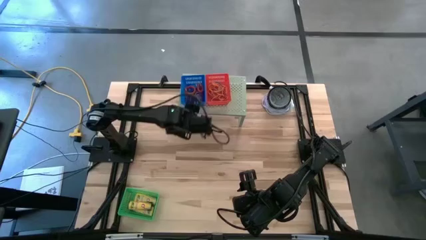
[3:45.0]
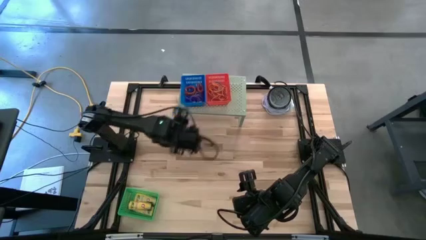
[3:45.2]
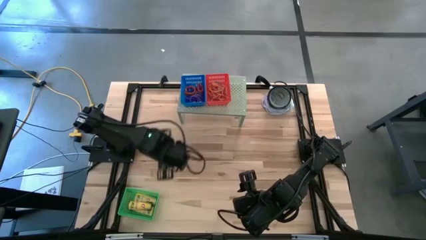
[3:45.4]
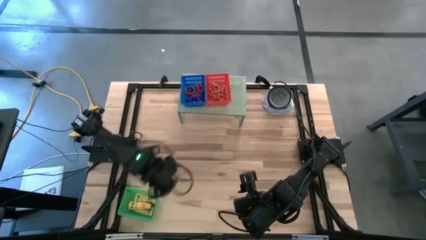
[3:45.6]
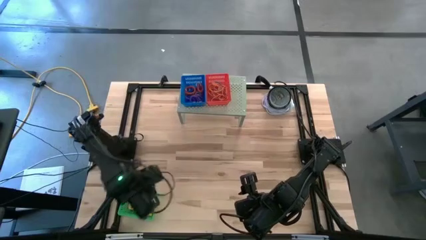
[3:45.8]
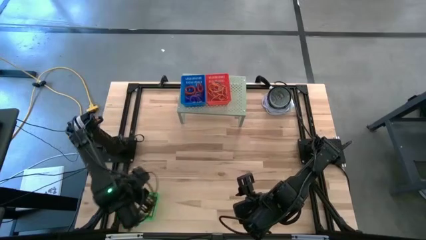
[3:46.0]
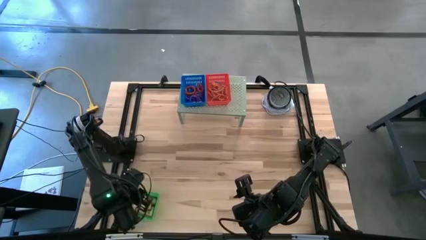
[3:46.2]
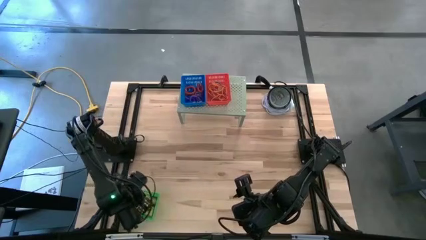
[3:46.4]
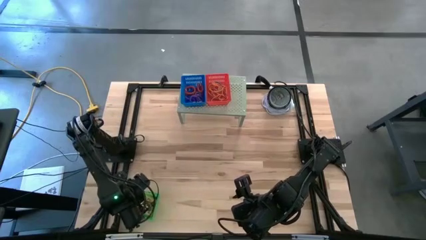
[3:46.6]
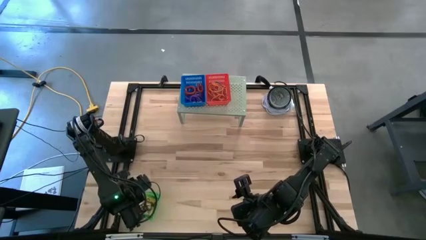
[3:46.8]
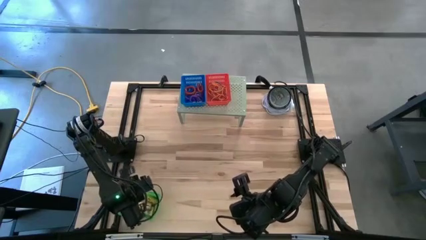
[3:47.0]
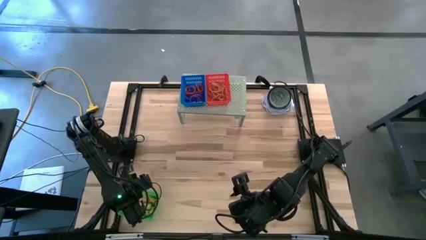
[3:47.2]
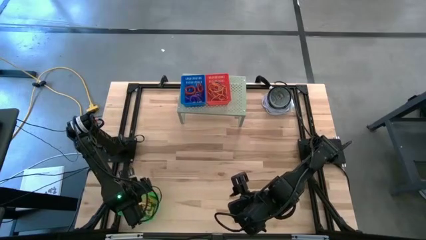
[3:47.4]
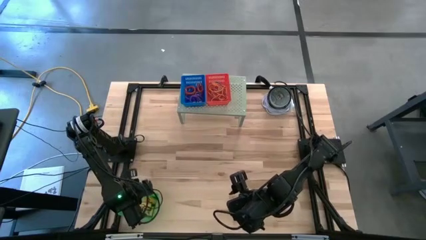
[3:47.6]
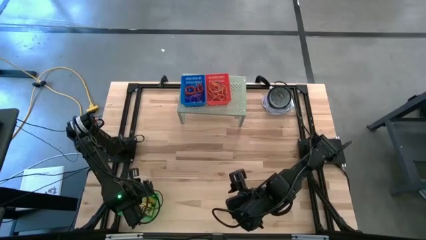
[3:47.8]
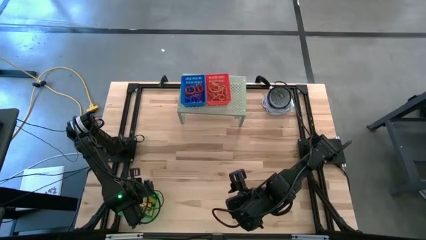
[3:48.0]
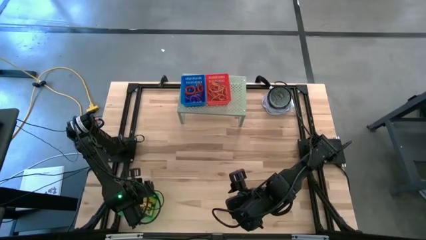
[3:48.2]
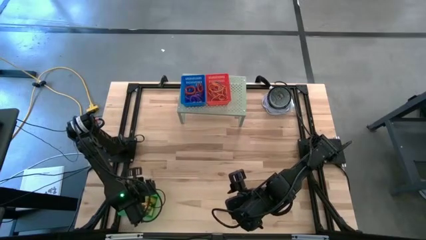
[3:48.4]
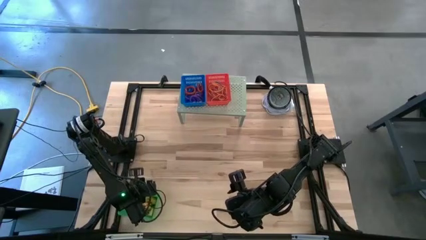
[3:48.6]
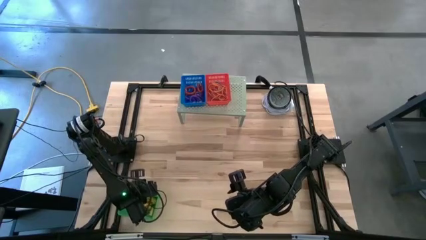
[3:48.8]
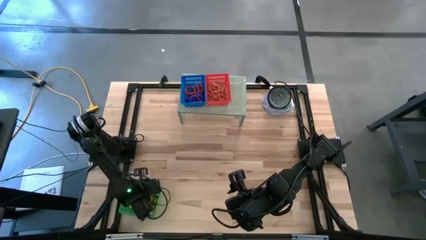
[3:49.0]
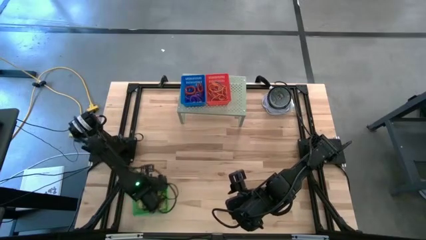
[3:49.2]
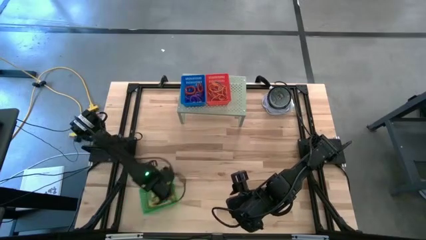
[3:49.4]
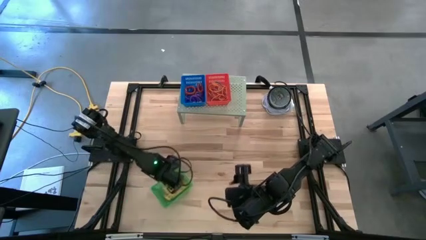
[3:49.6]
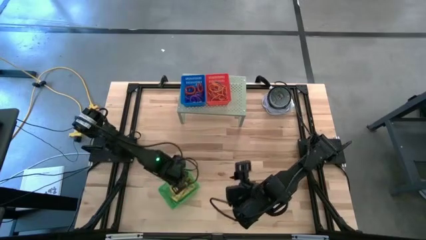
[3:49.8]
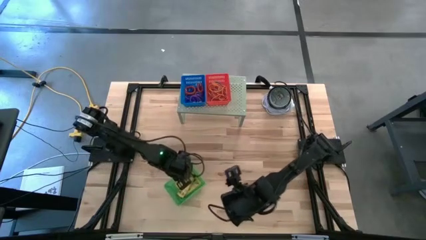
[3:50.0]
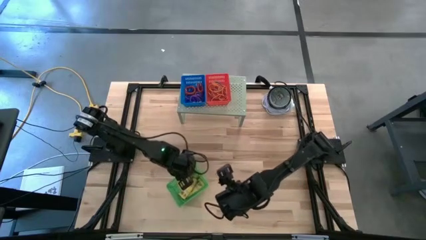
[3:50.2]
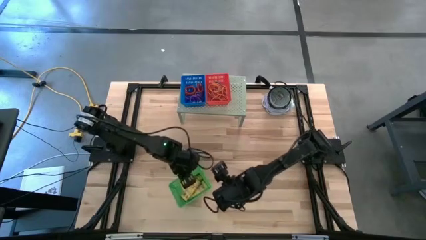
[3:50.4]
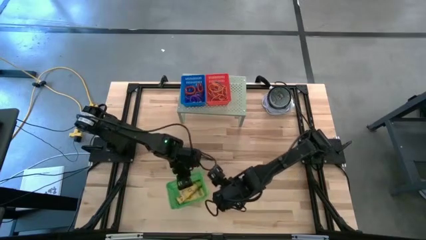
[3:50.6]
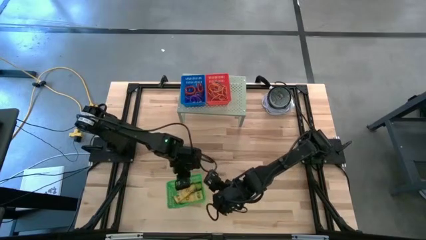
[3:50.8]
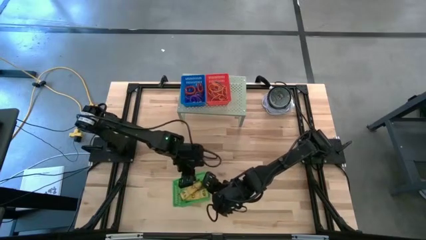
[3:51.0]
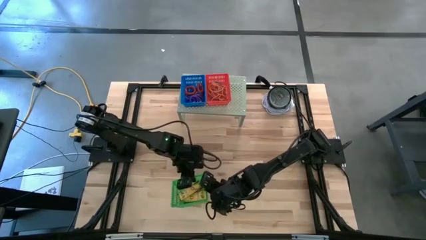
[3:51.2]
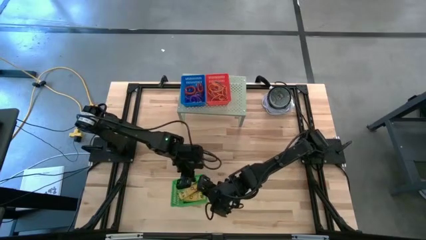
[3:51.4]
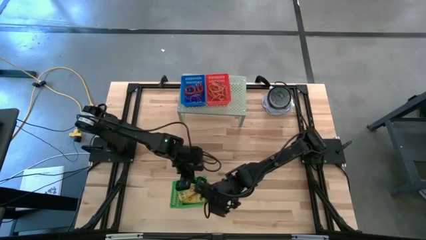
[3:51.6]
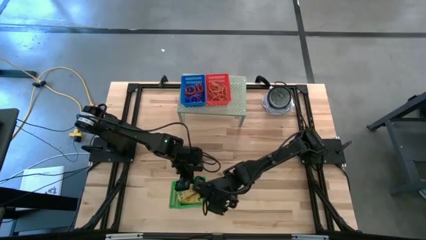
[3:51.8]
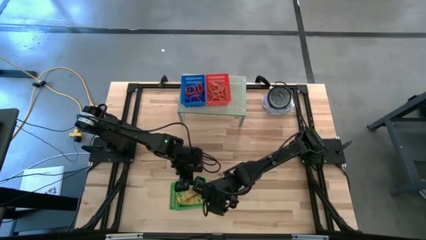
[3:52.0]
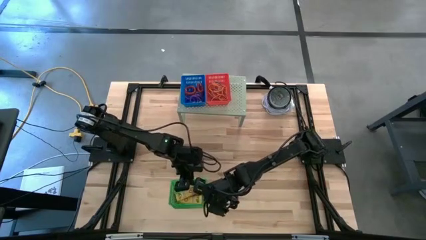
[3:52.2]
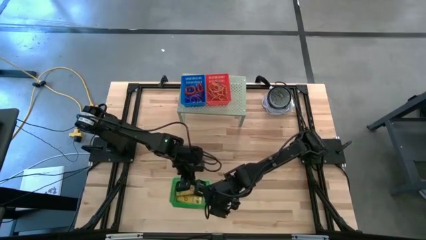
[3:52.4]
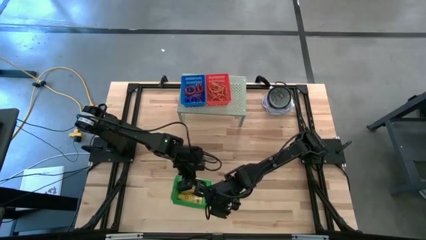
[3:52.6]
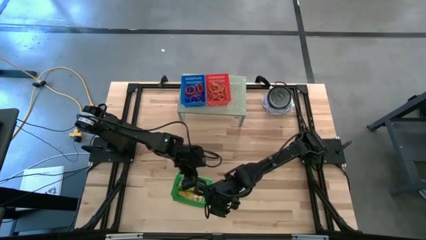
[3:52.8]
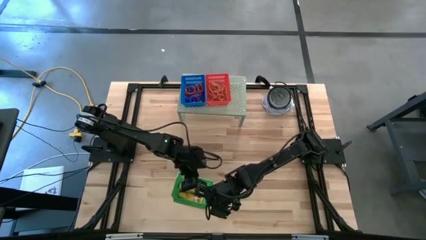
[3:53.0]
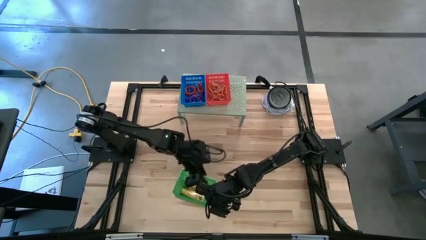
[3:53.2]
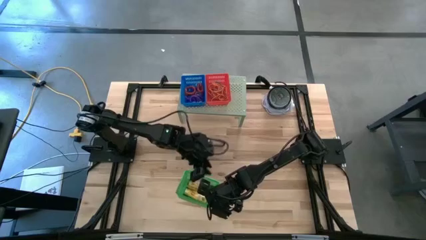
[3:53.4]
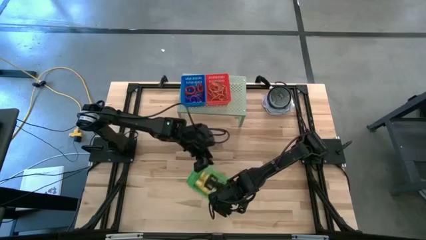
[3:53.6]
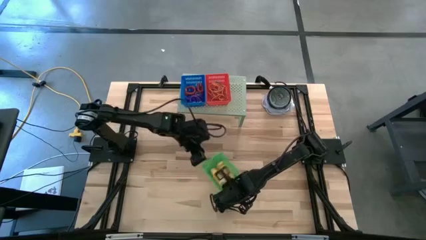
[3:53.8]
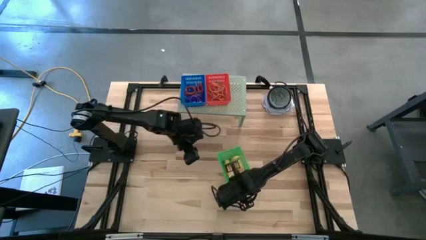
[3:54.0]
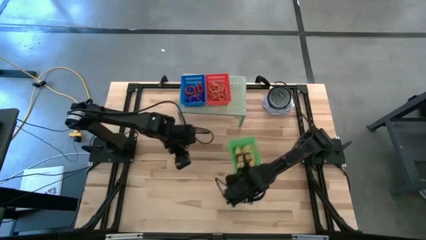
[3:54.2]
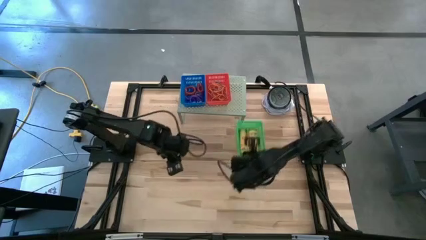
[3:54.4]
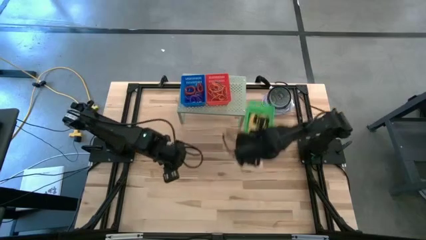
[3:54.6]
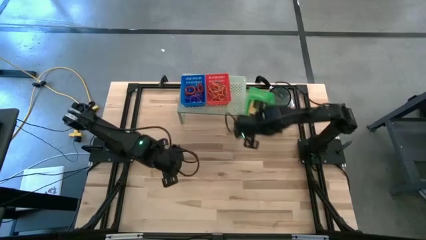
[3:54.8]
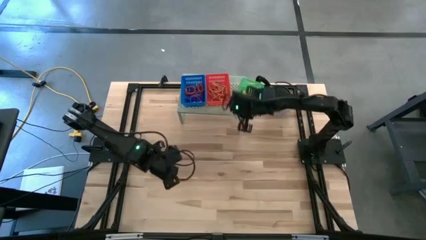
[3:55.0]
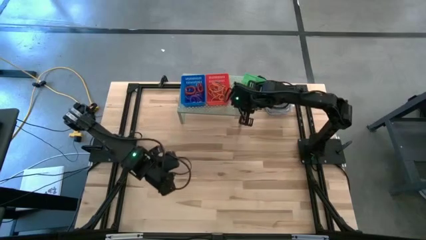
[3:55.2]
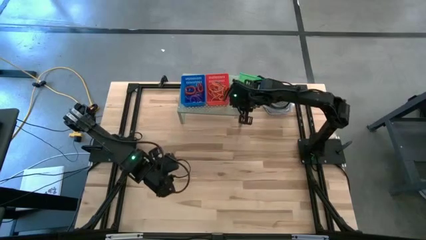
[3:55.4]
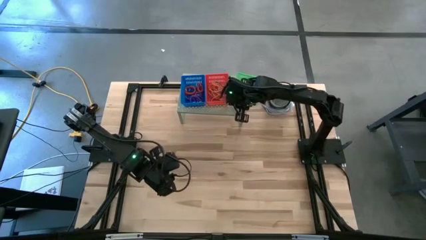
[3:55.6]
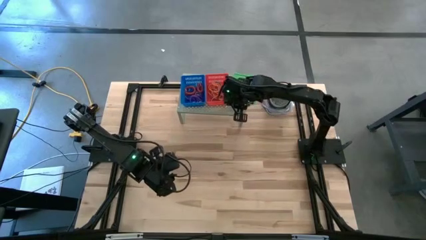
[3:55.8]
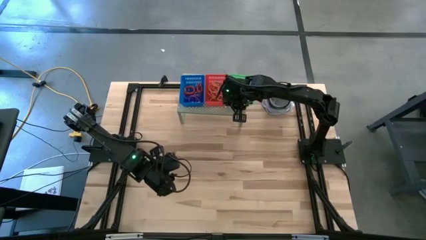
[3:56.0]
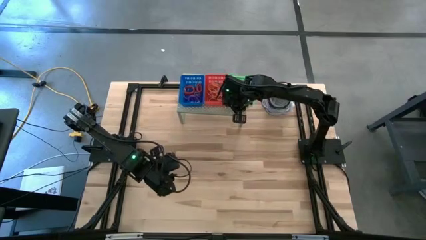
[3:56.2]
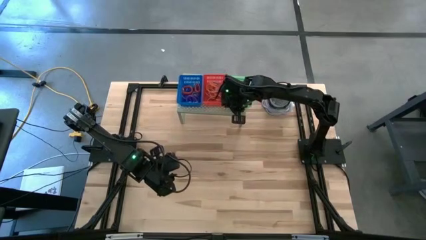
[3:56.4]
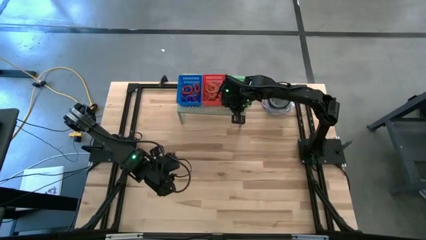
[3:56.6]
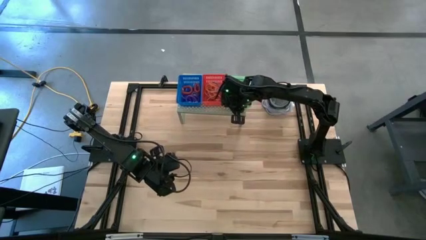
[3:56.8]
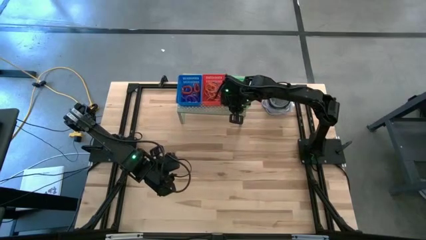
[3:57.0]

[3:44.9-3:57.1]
Task: Pick & Place Office Desk Supplies
Put the green bin with crayon boxes on the shelf

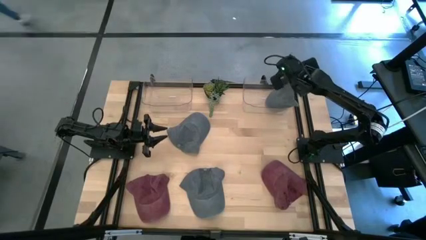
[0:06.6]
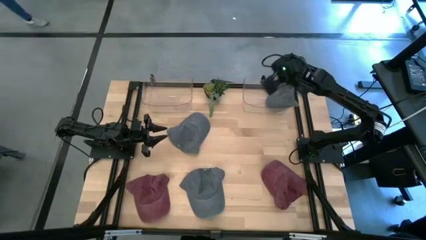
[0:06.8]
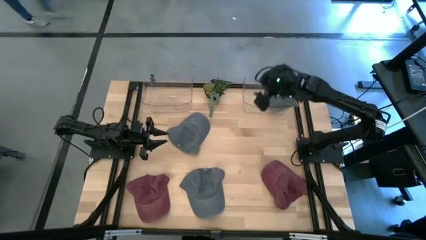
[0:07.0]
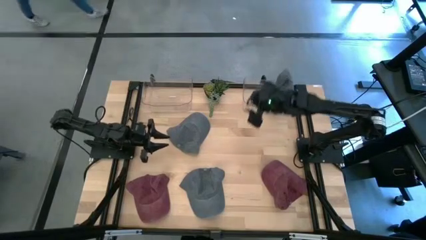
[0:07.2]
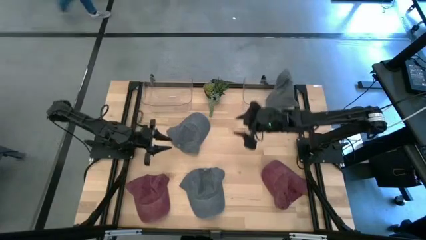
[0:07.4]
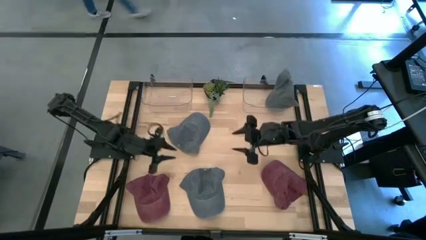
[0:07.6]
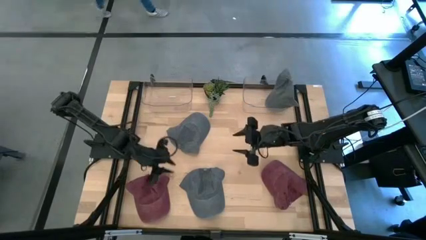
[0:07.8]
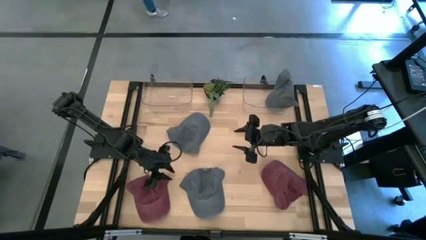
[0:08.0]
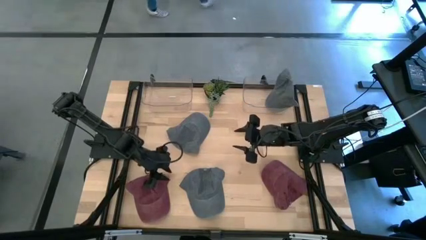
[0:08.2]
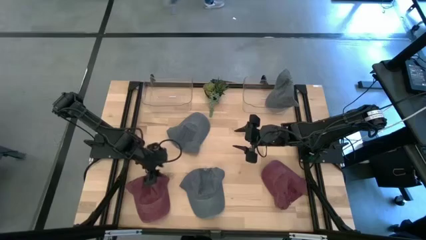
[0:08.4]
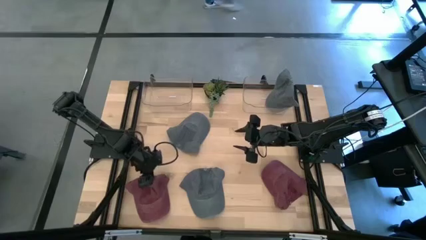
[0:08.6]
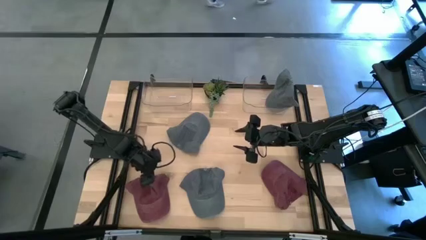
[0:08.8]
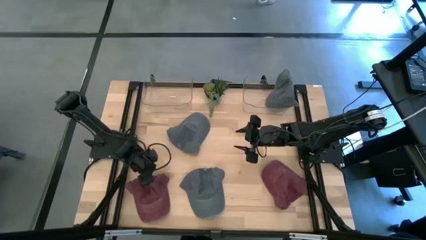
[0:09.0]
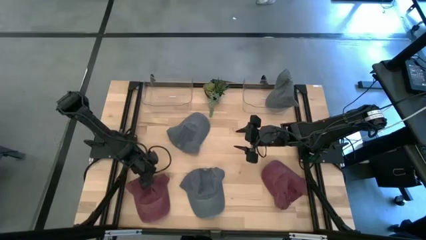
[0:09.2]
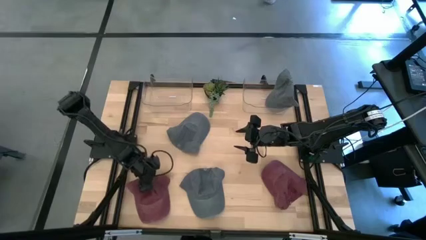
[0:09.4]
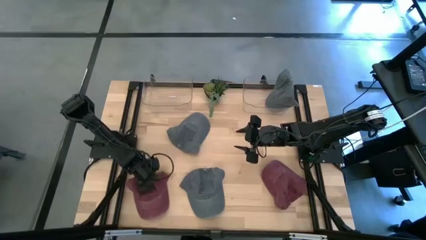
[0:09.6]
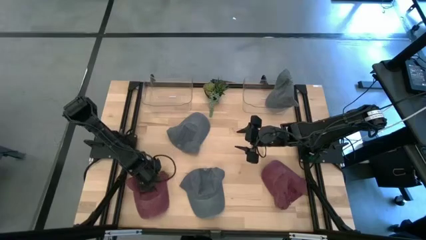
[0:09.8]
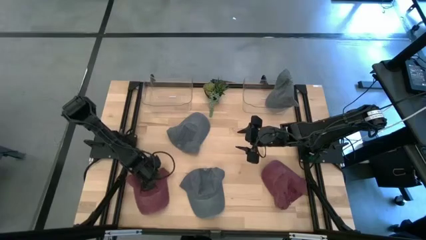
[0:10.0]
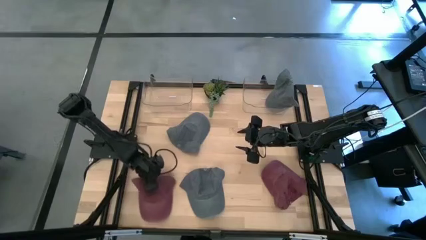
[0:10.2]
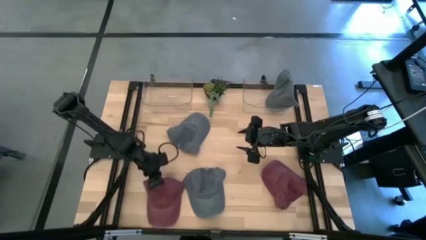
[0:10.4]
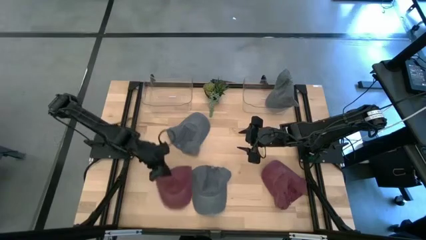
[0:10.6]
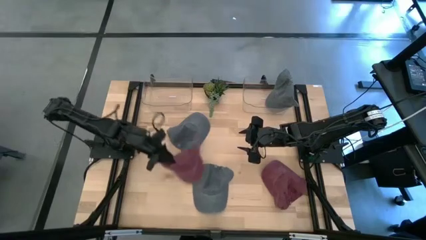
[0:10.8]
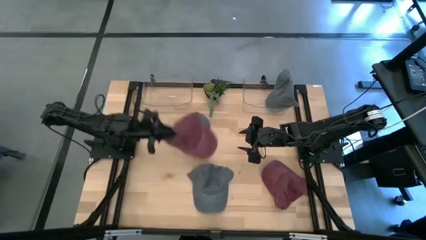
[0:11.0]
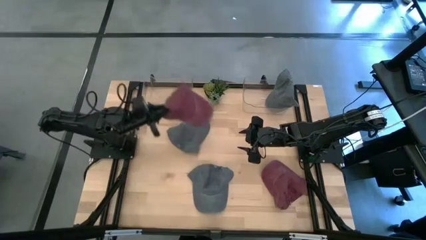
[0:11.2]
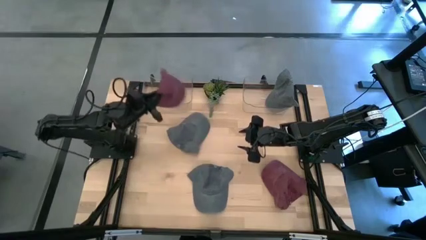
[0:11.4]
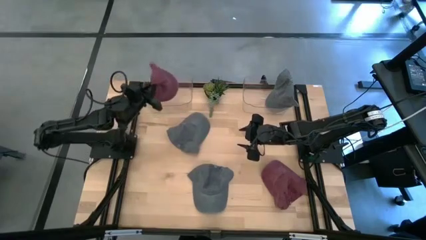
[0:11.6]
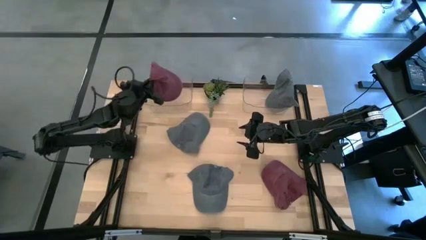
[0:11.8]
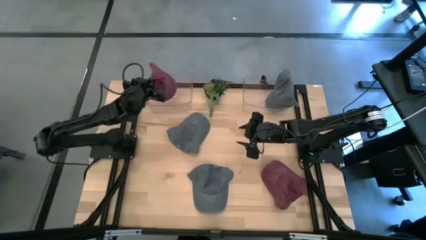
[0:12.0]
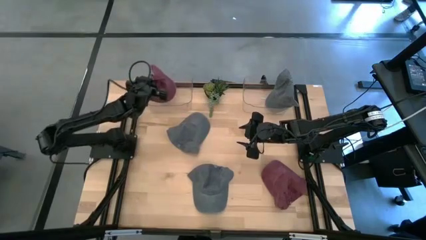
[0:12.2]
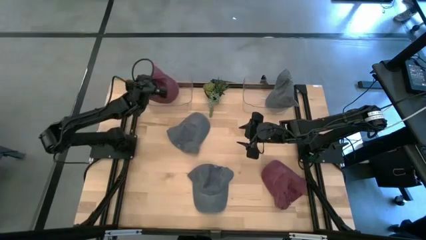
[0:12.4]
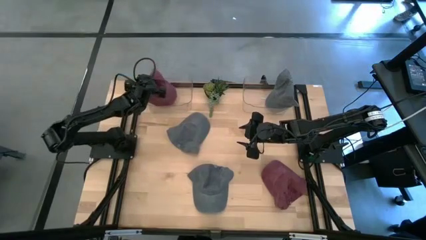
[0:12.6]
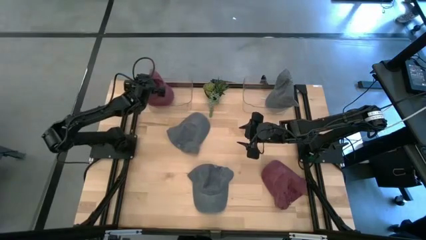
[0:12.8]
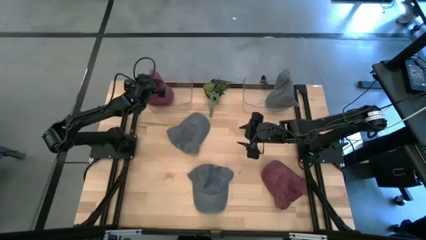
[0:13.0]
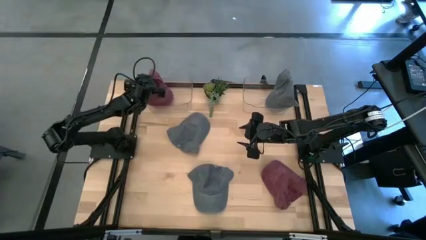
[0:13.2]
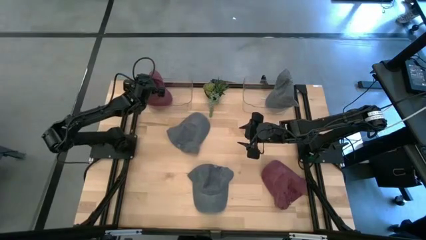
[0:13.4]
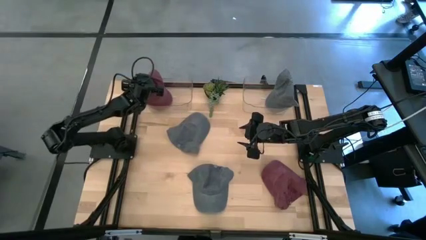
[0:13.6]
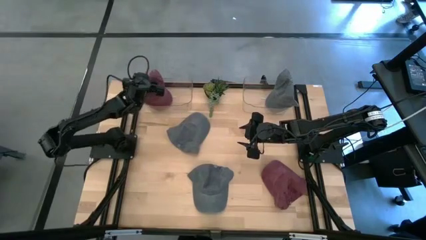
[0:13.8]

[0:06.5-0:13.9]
Task: Pick & Place hat
Put the left red cap into the left transparent bin
